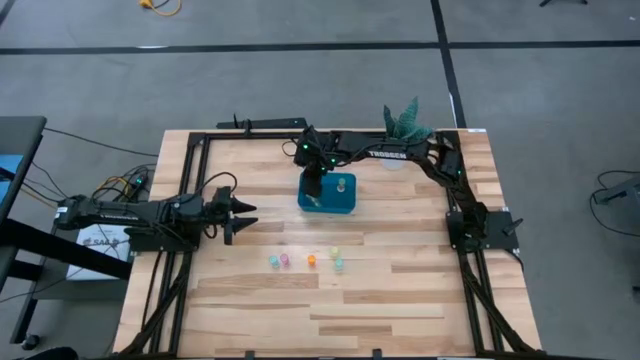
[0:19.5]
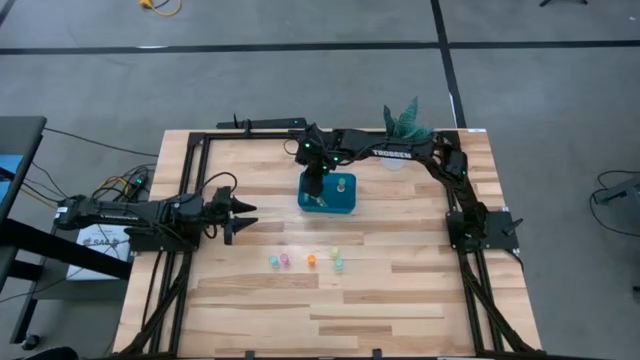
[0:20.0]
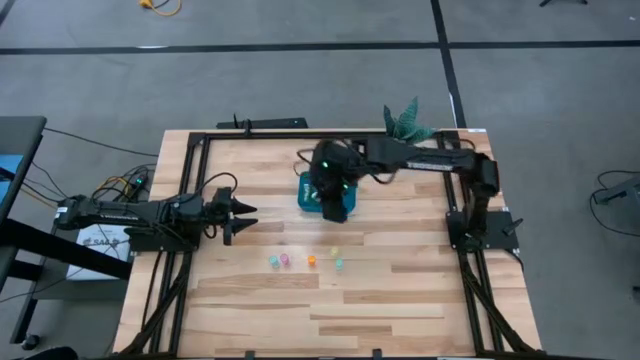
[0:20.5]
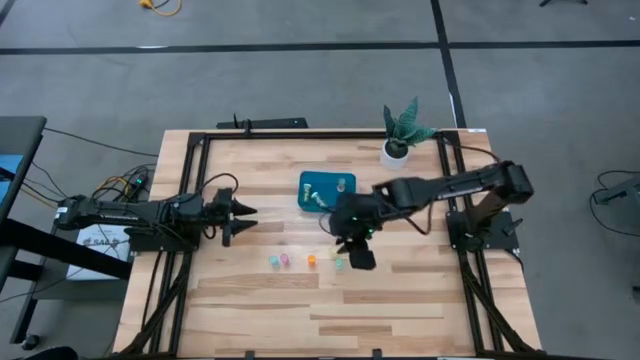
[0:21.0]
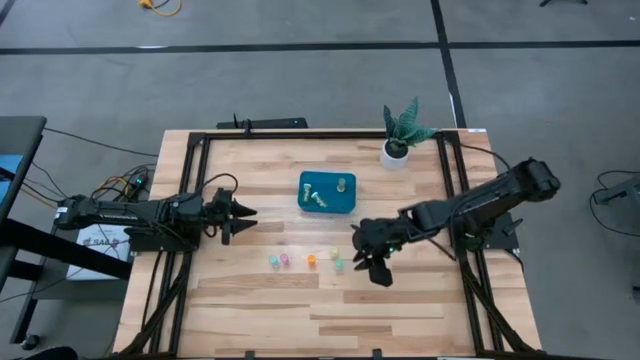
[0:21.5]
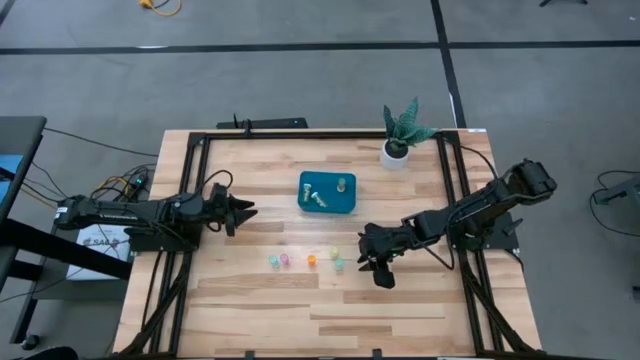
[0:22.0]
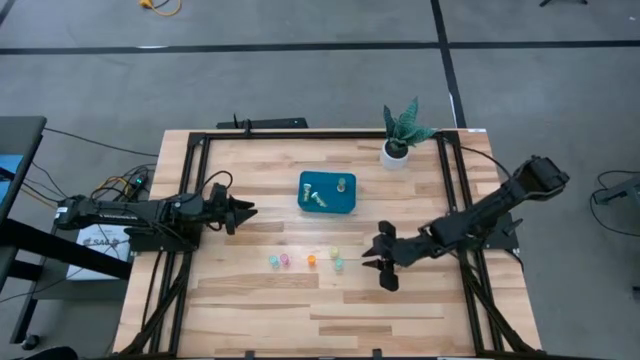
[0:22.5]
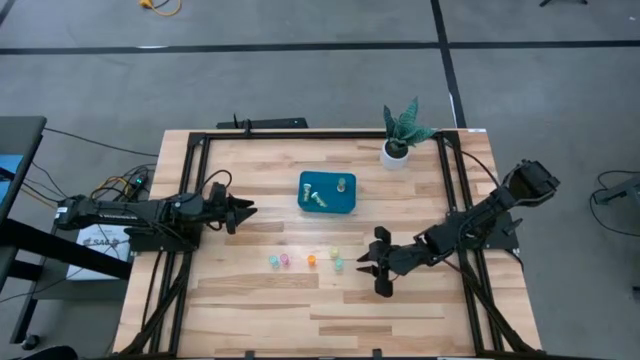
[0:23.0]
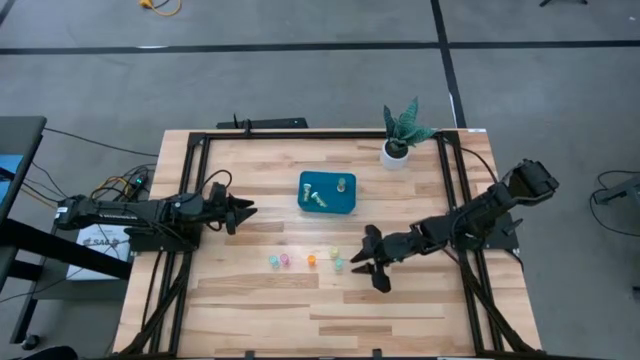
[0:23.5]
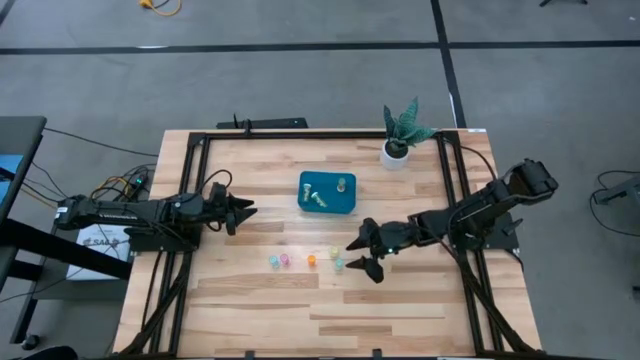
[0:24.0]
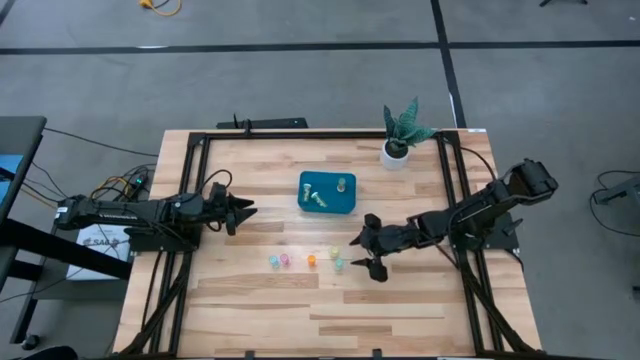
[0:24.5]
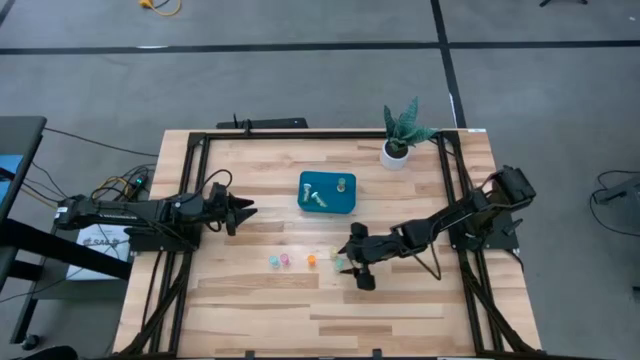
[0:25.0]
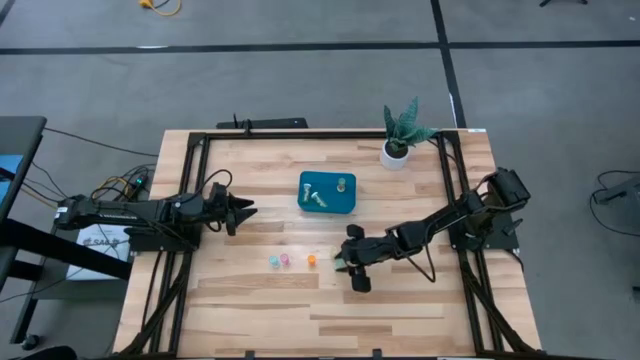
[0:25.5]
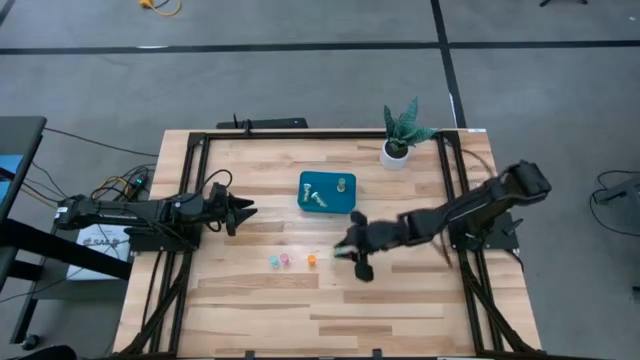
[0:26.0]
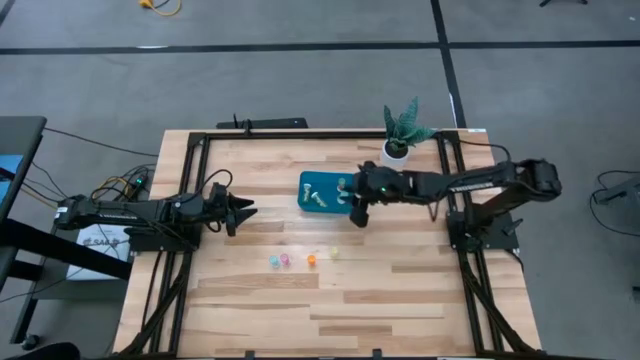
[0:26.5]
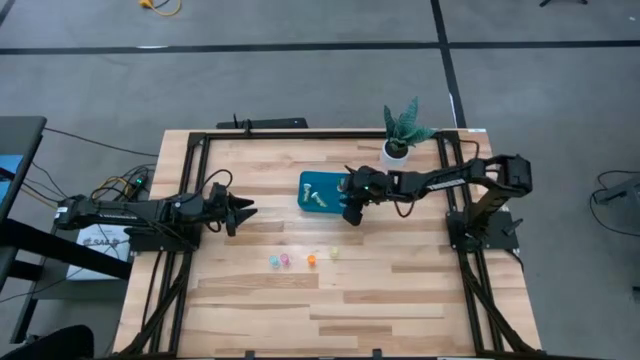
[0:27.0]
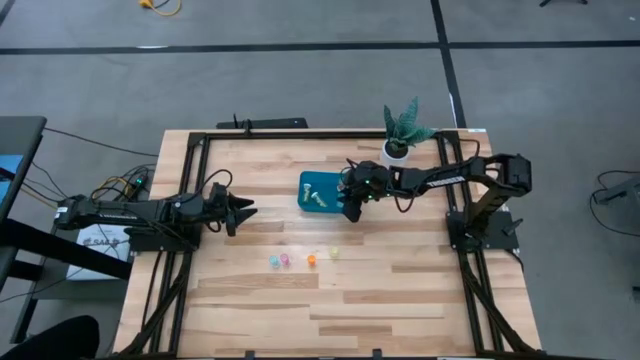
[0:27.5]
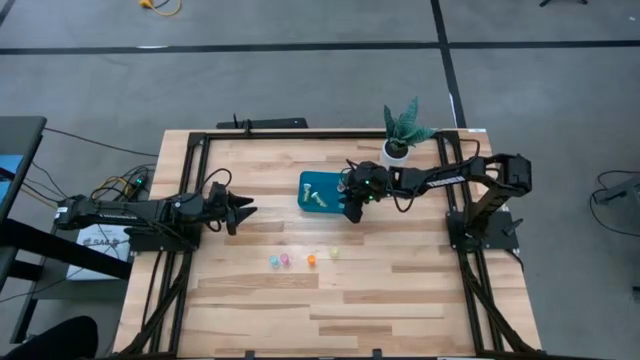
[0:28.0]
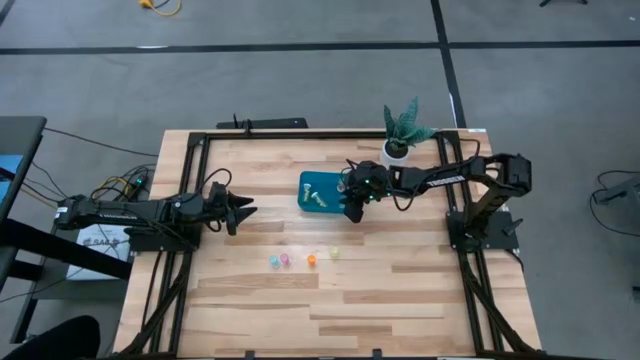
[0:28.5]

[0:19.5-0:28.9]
Task: Pick and place pill bottles into a basket
Put the blue medicine bottle into the blue bin

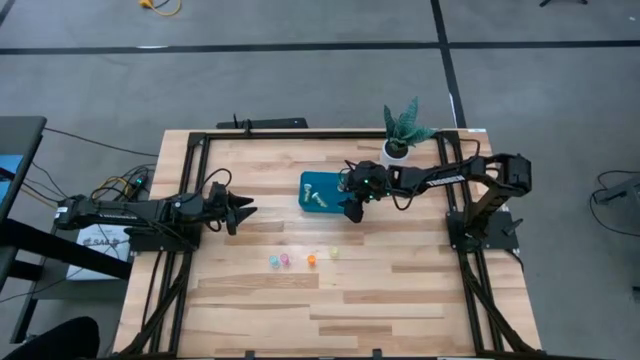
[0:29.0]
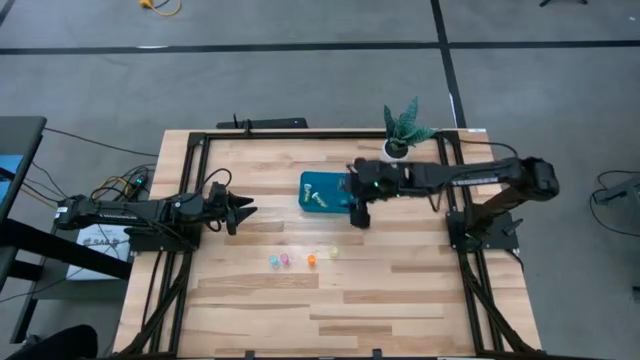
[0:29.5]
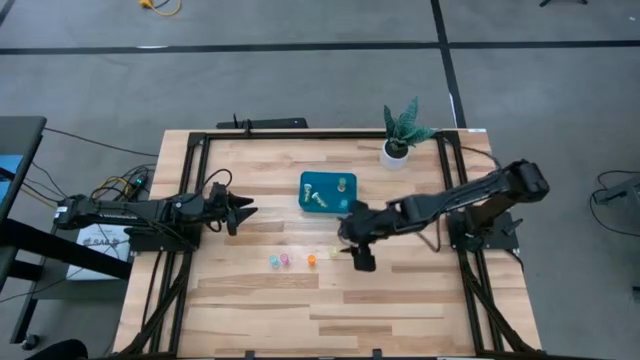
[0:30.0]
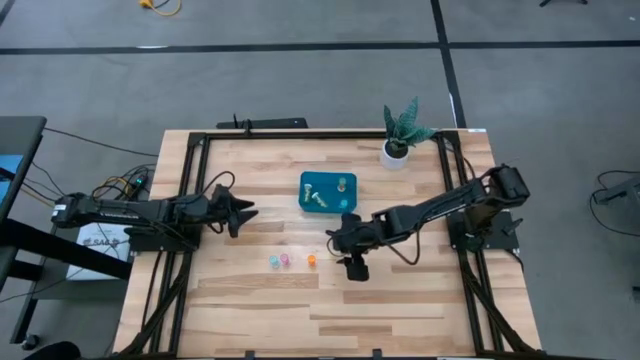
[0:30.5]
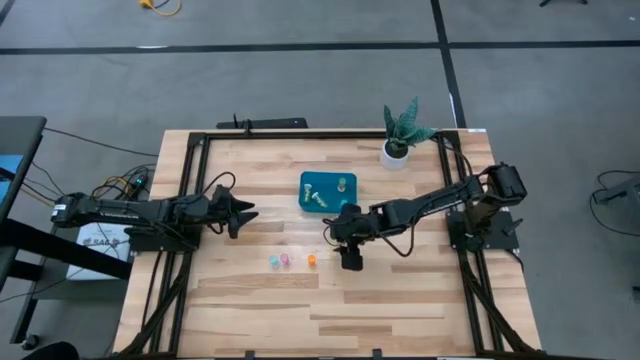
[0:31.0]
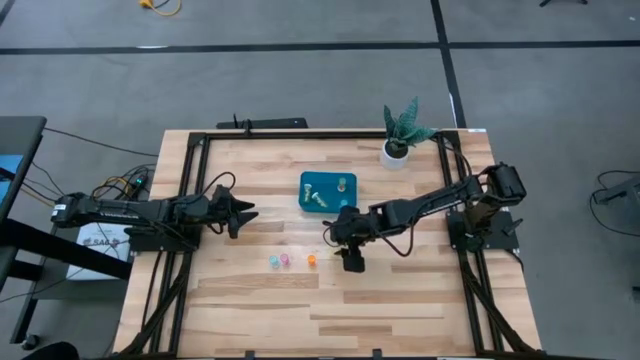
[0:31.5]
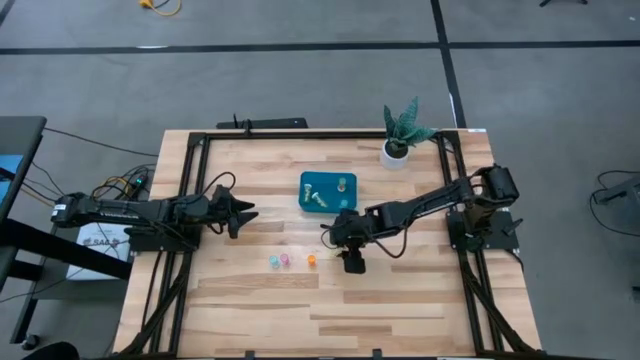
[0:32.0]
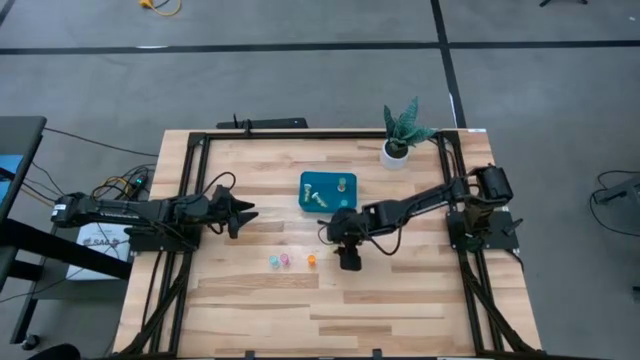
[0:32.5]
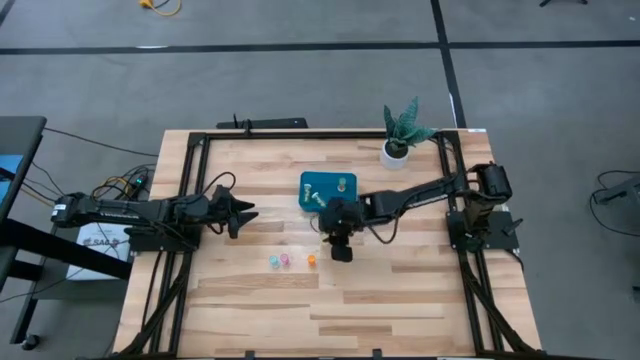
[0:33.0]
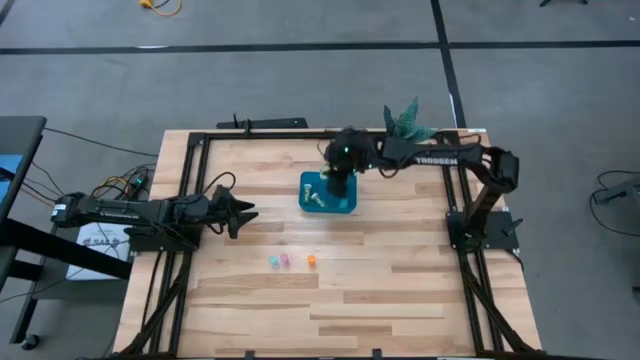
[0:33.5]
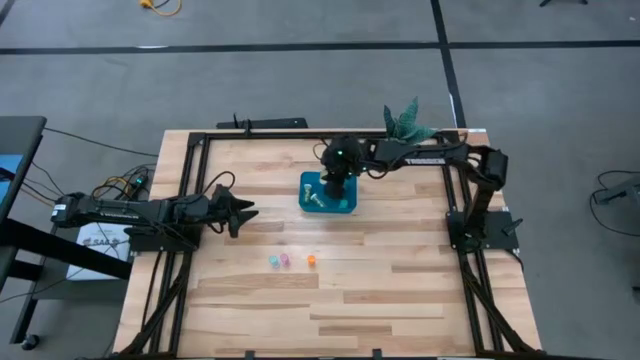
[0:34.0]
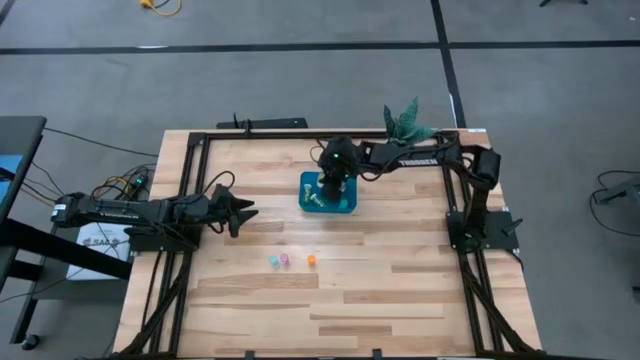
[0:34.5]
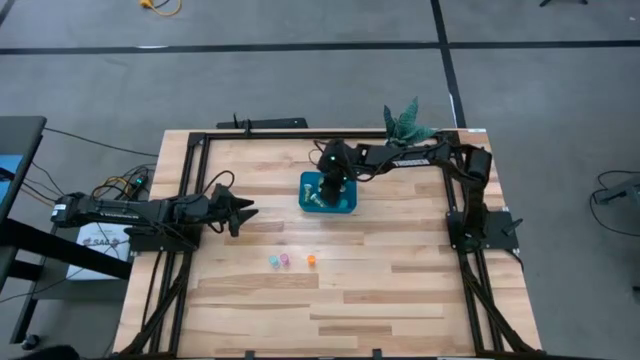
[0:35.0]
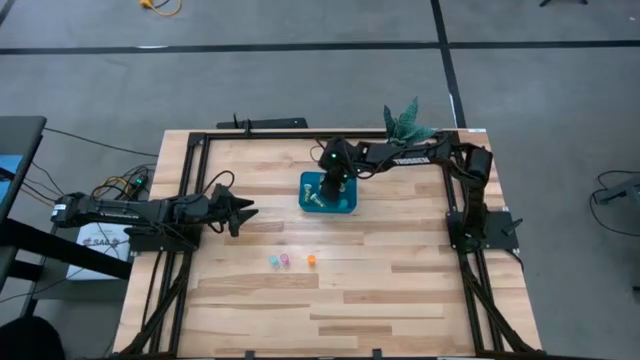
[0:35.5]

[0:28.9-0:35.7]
Put the green medicine bottle into the blue bin

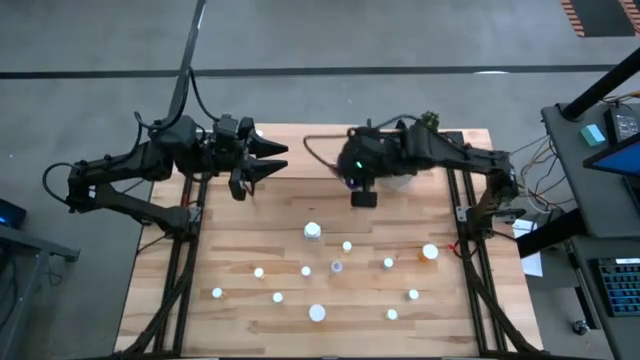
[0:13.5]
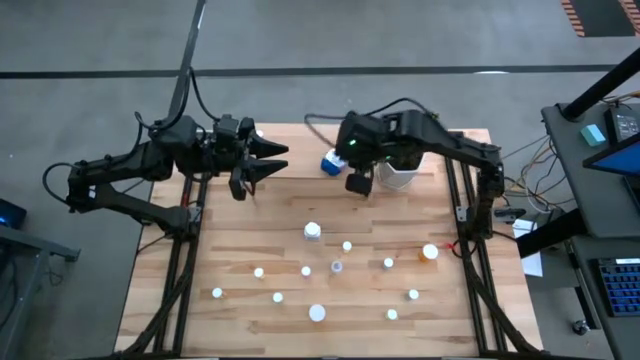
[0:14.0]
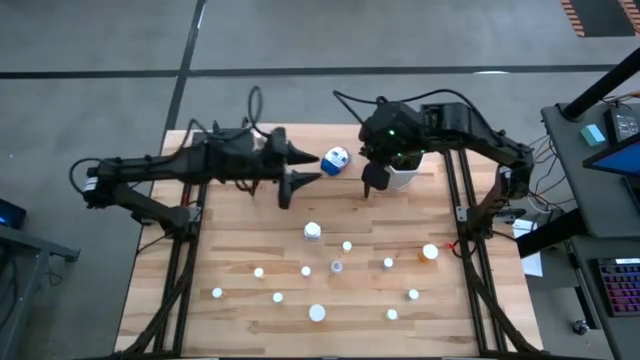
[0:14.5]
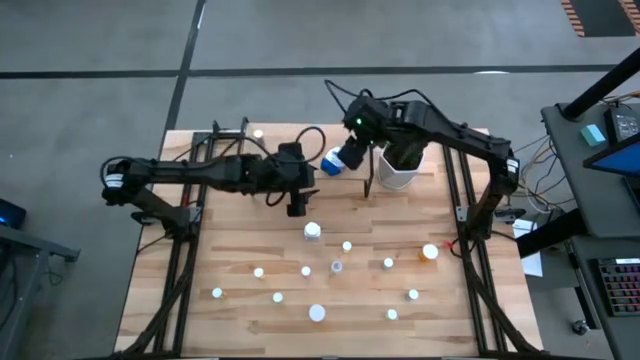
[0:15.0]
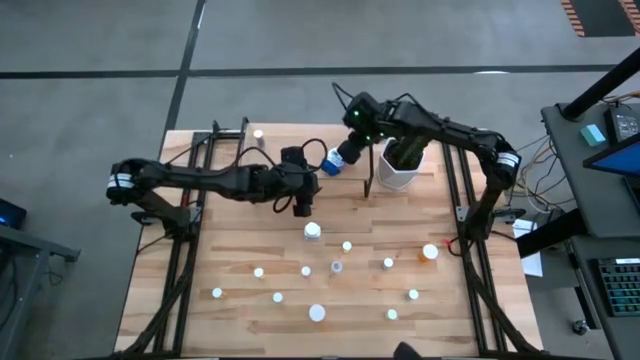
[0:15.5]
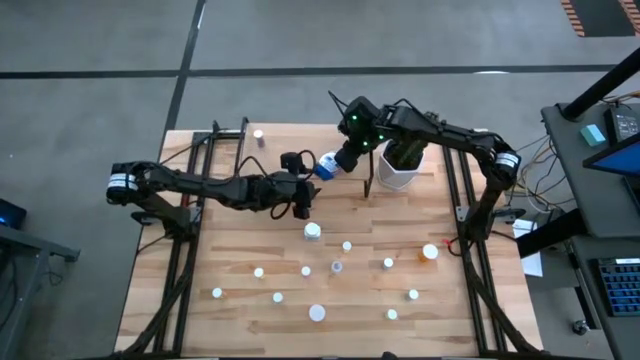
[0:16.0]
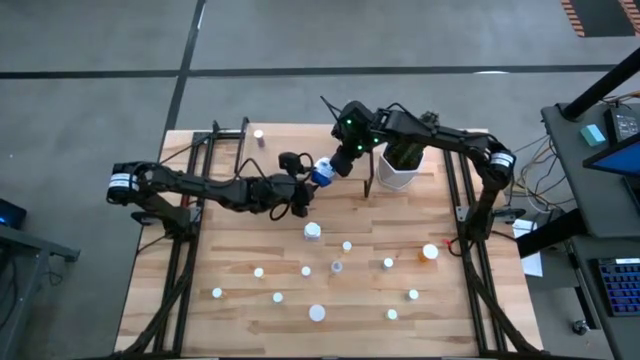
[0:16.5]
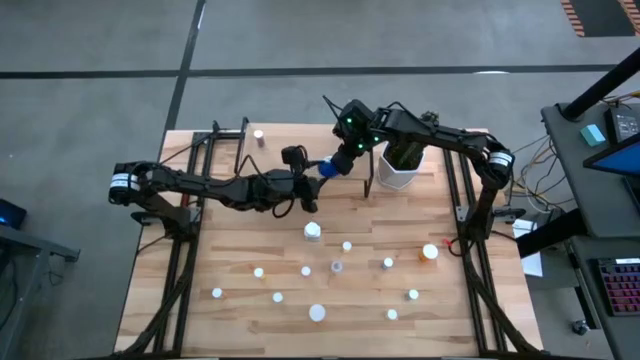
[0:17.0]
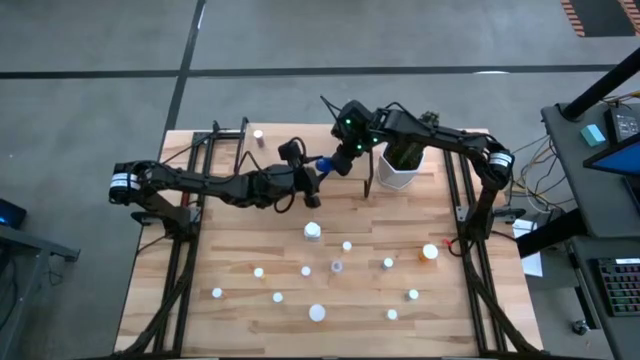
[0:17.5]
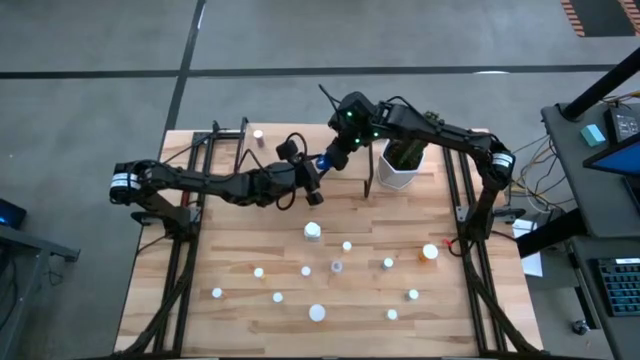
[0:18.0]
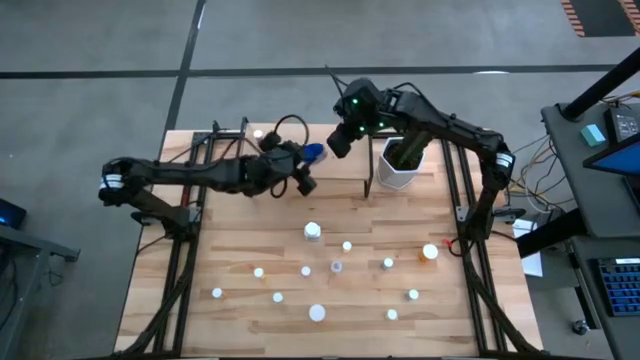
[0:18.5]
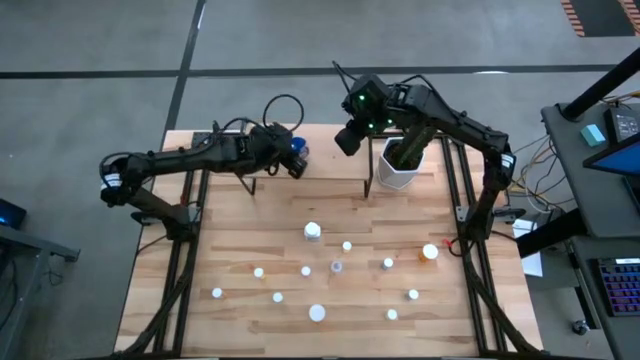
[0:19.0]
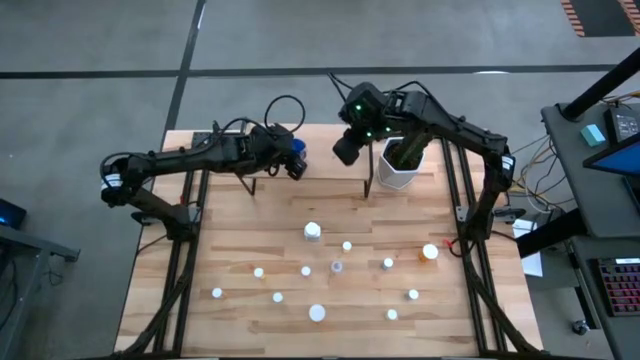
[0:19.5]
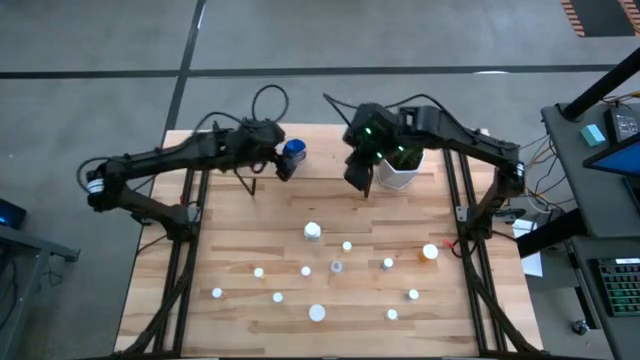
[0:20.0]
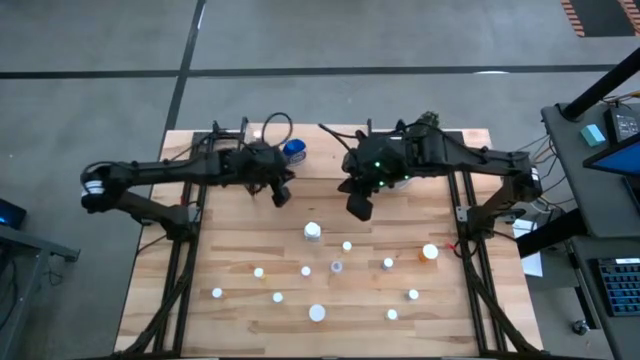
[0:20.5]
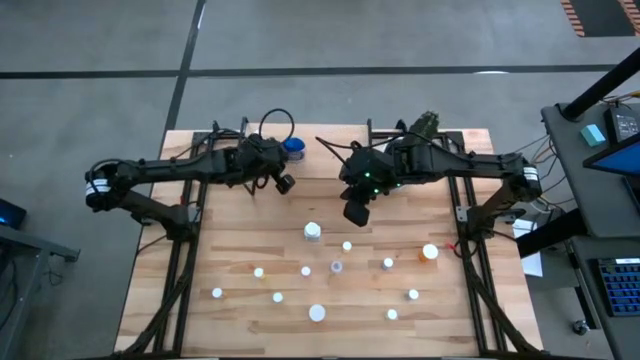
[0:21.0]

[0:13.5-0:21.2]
Task: Pick and place medicine bottles onto shelf by color
Put the blue pill bottle on the shelf
